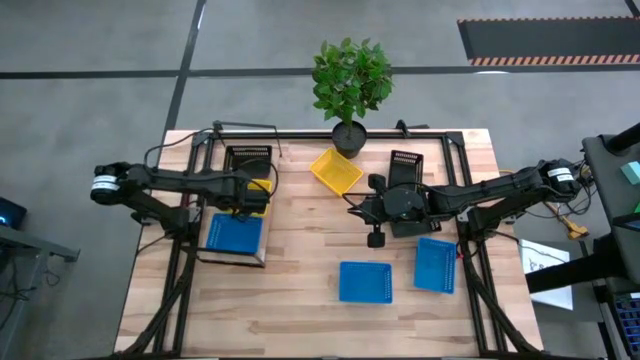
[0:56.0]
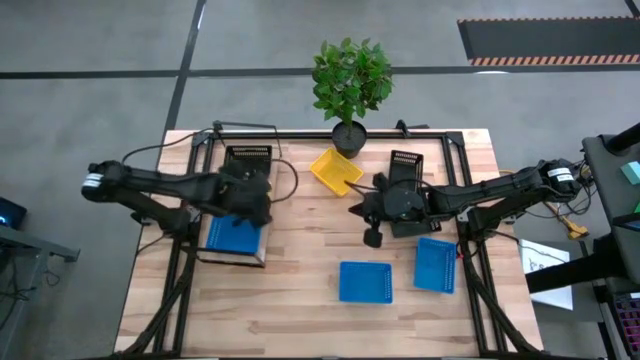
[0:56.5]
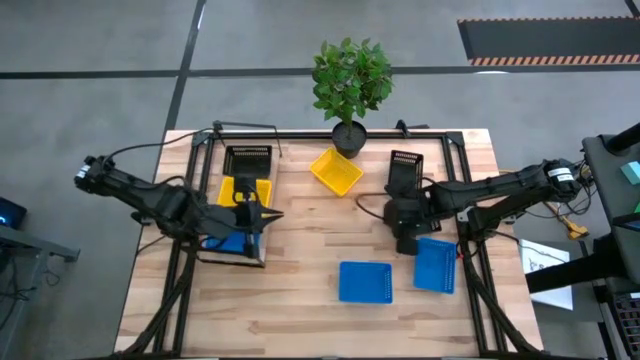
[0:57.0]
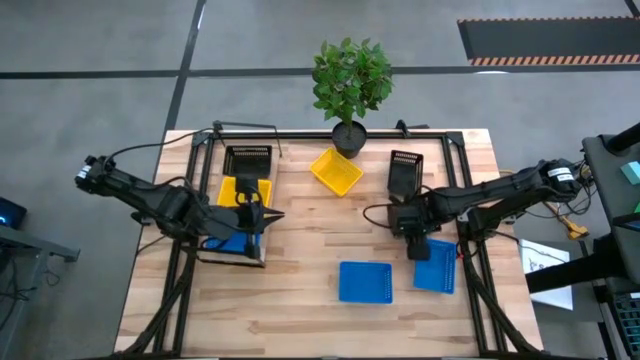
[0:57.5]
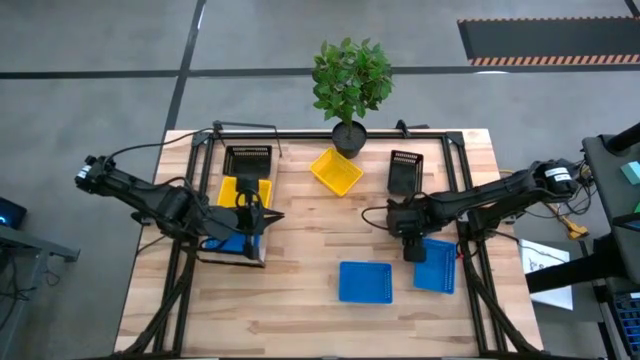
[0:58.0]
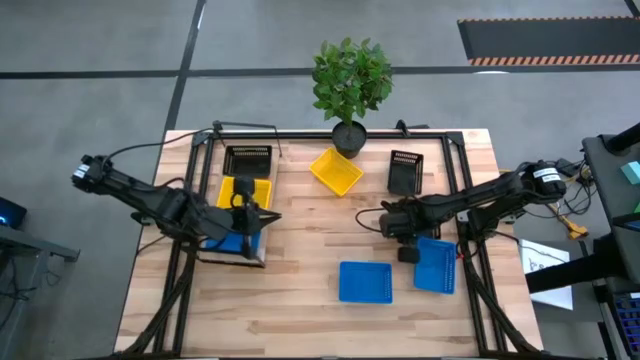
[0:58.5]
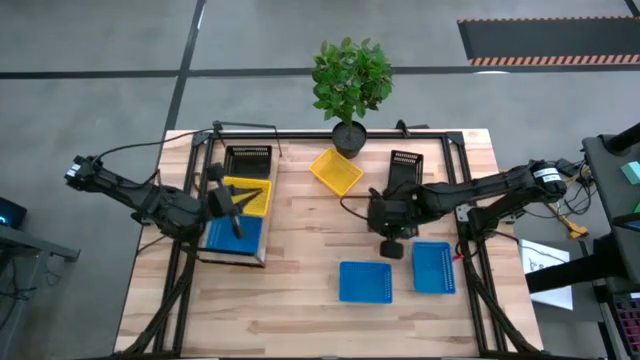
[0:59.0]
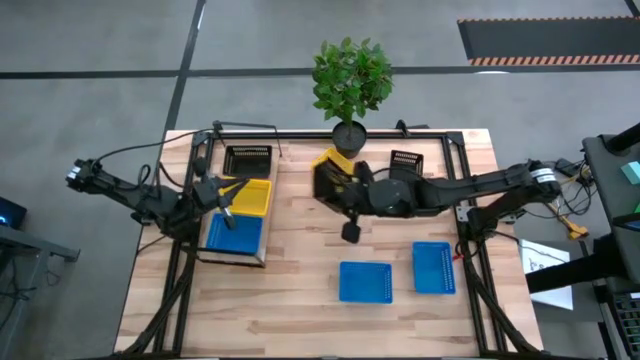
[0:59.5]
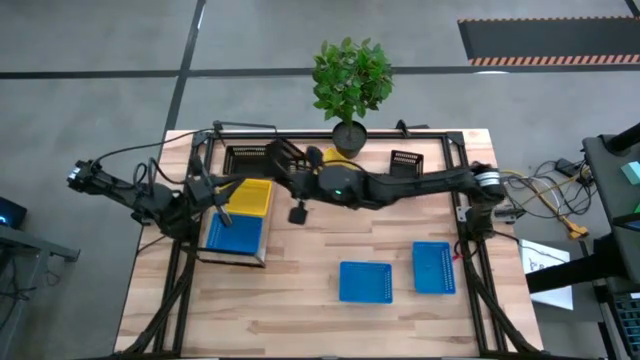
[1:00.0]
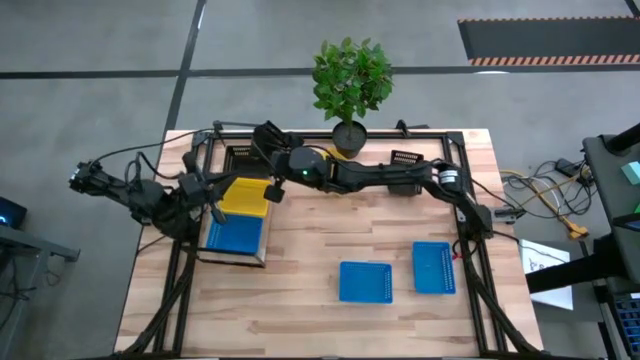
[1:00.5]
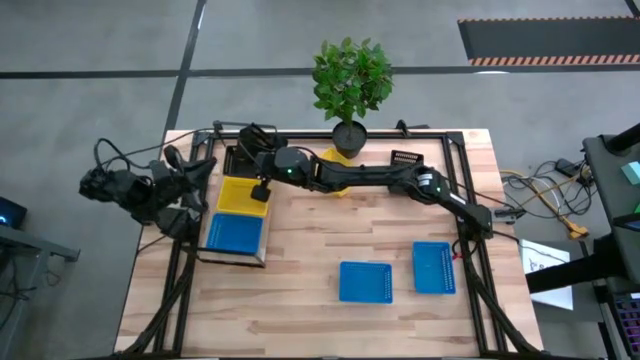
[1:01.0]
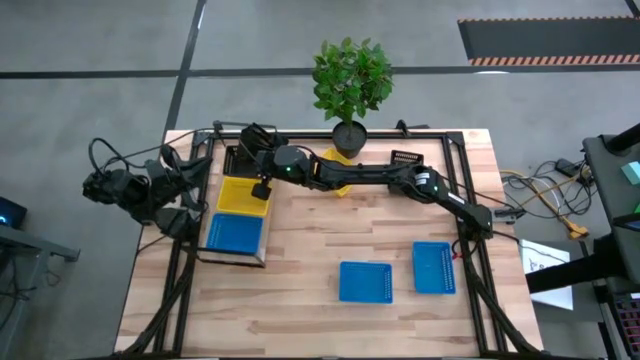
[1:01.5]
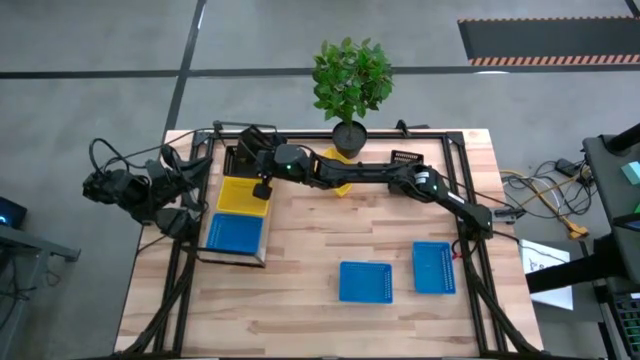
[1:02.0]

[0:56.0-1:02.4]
Stack the bottom black basket on top of the black basket on the shelf

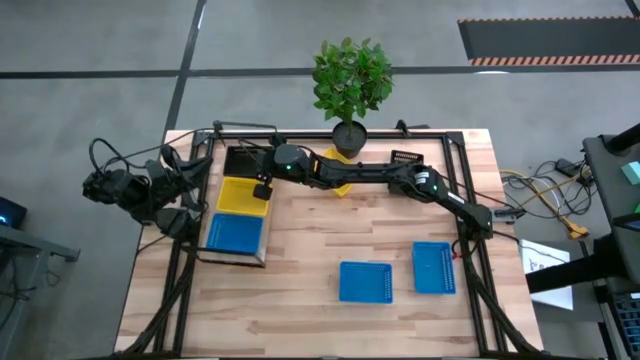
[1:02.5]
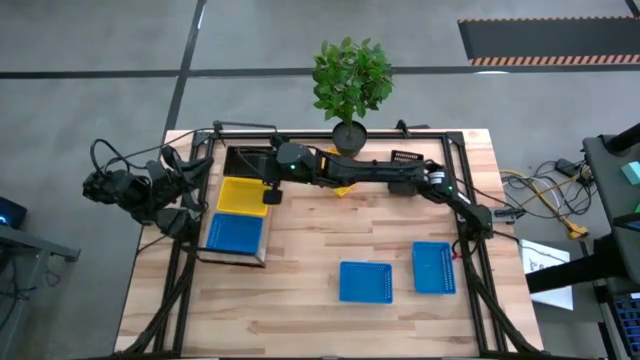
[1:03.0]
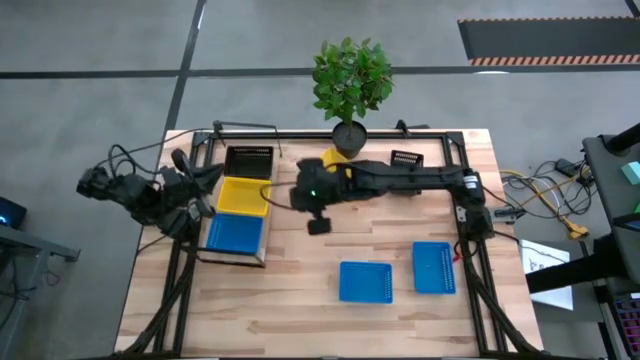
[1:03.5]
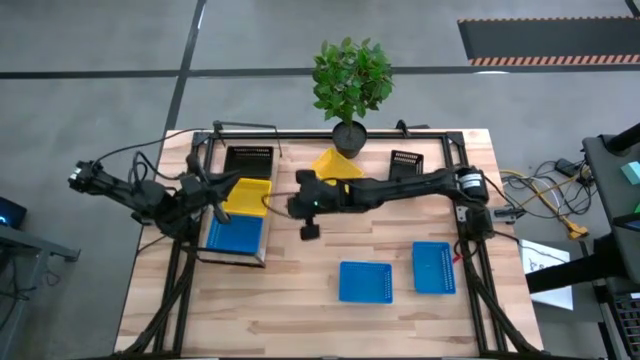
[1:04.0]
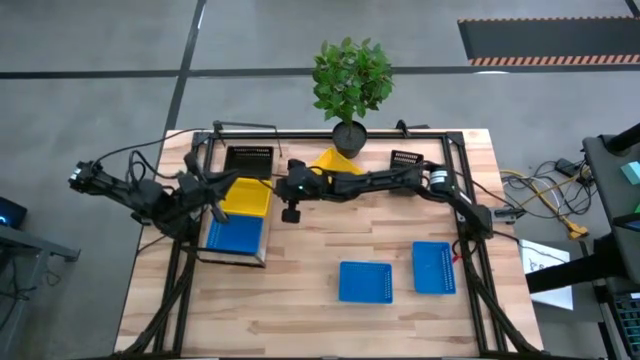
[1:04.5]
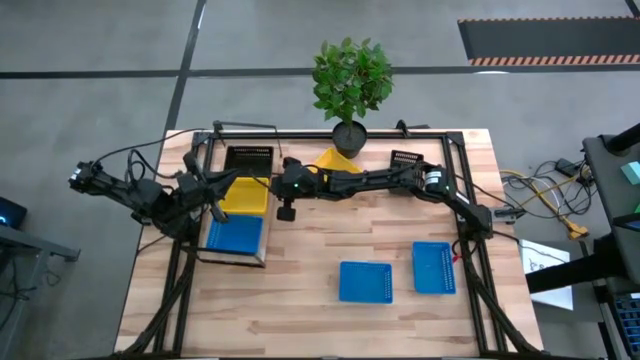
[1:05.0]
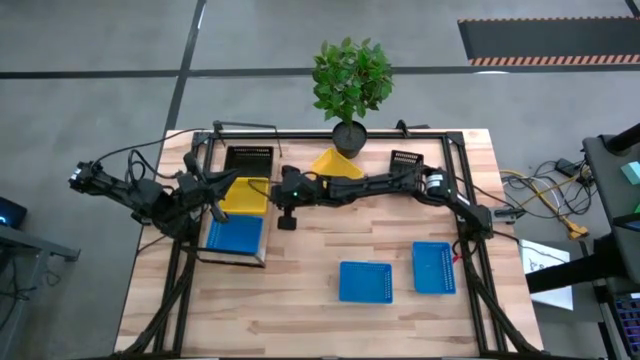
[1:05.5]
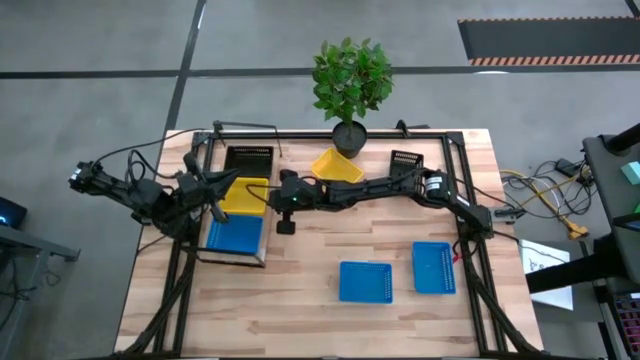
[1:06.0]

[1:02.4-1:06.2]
Adjust the stacked yellow basket on the shelf

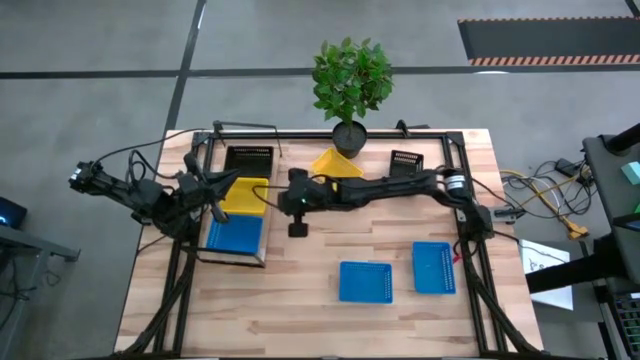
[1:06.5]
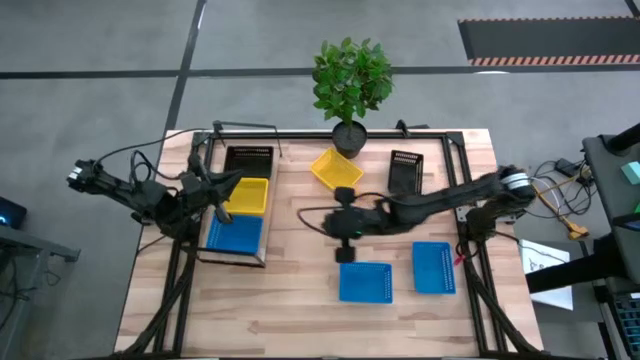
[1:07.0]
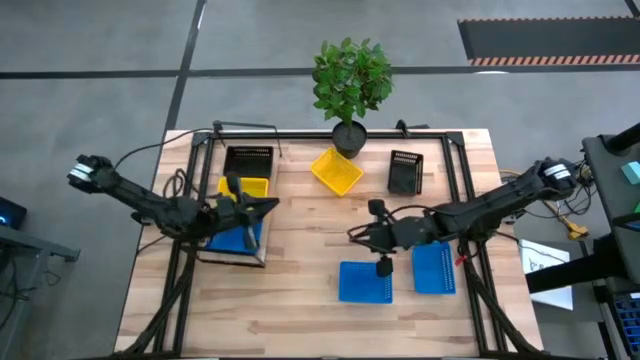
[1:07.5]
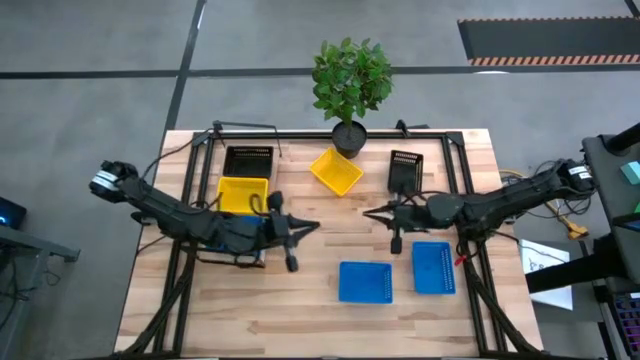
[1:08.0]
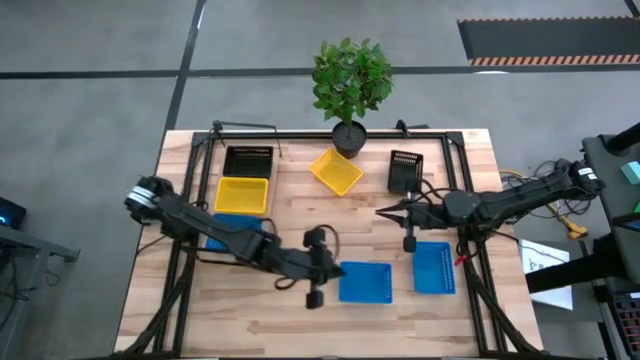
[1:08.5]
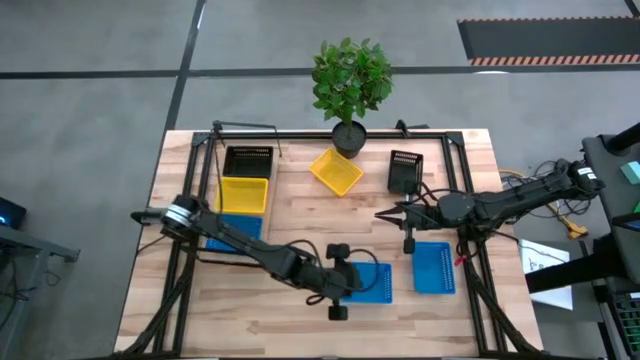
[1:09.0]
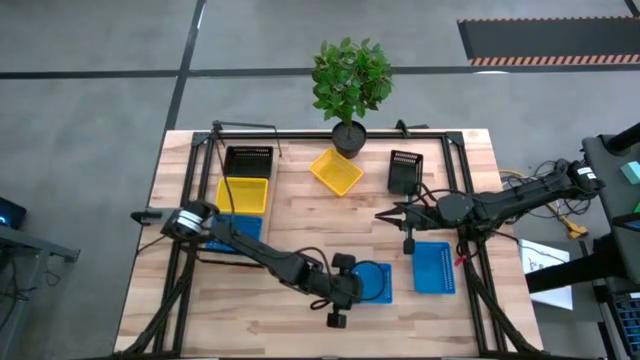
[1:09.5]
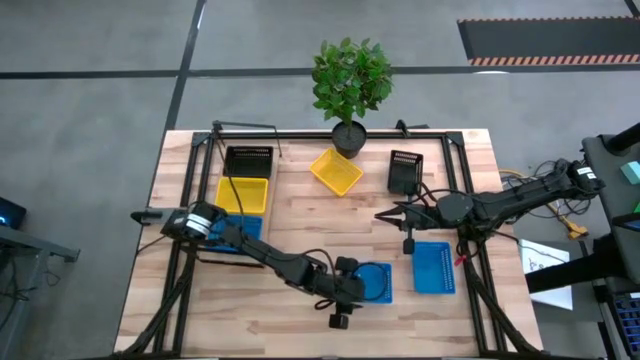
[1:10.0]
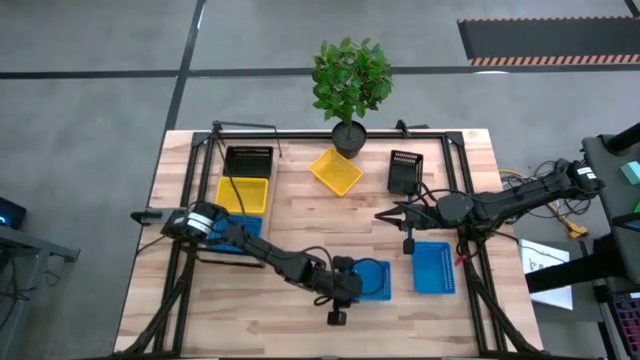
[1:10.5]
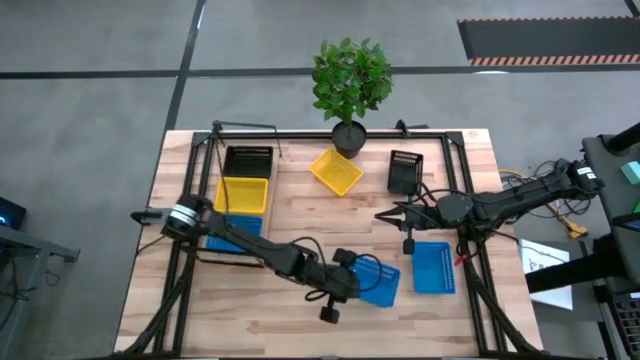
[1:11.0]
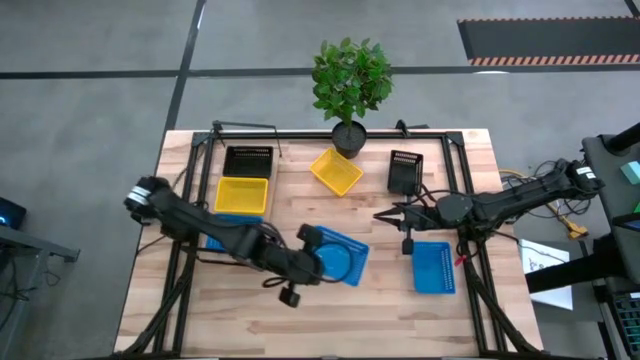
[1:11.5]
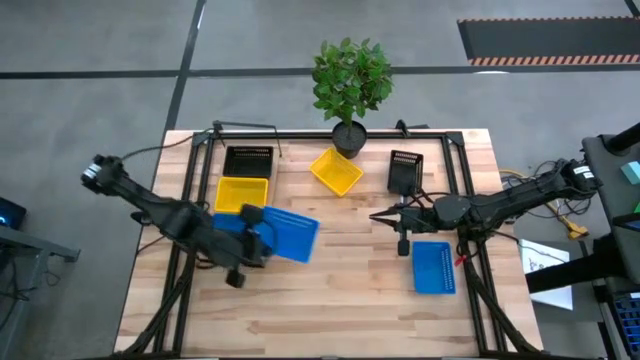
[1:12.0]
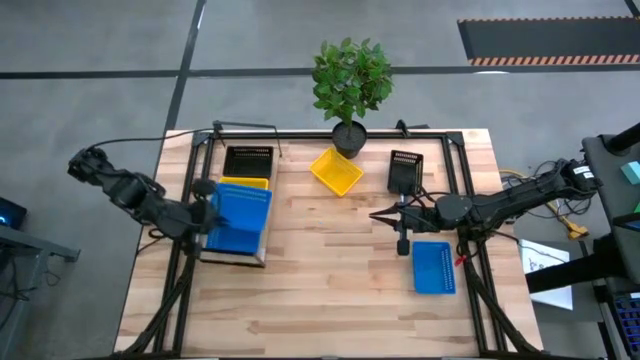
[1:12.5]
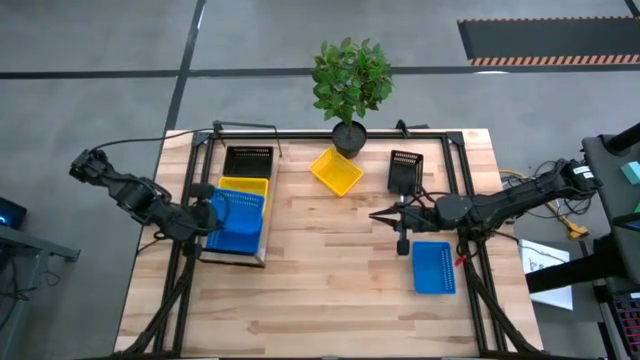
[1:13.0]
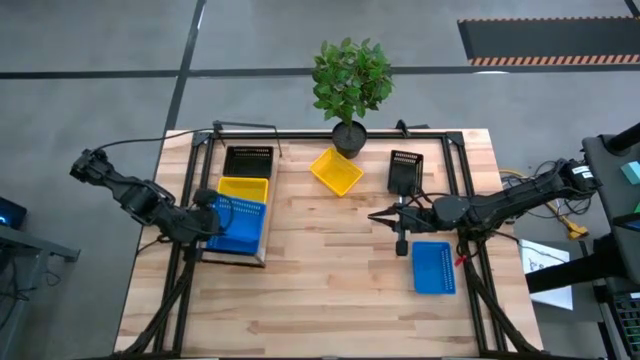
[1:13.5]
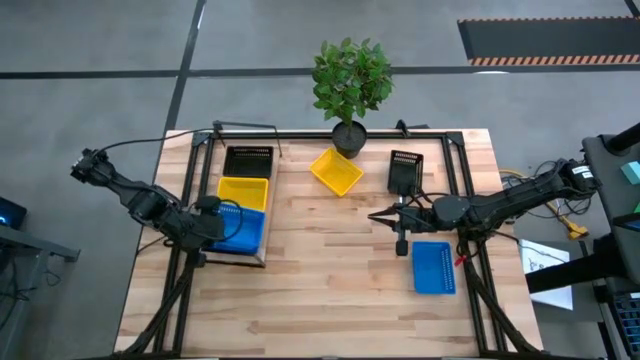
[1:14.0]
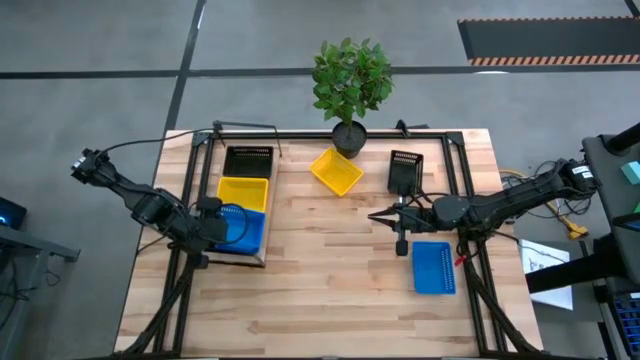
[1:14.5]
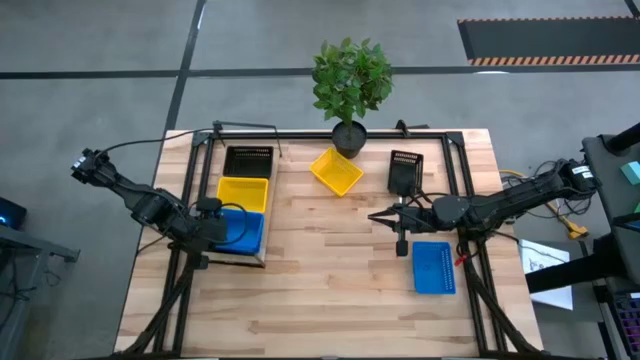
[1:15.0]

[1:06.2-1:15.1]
Stack the left blue basket on top of the blue basket on the shelf
